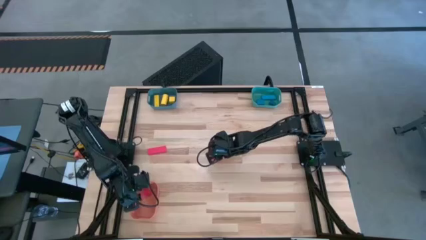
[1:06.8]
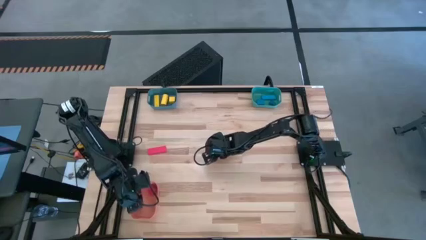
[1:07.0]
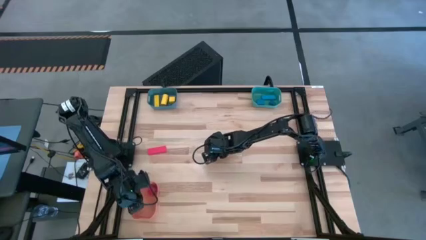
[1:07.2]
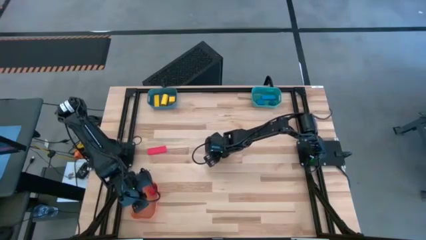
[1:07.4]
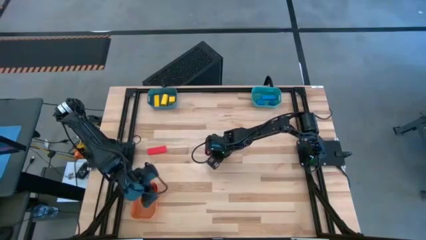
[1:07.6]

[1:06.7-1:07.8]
Task: Sort & place blocks by color
Put the right red block into the orange bin

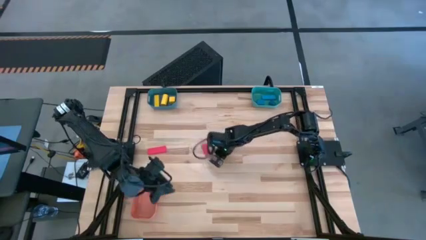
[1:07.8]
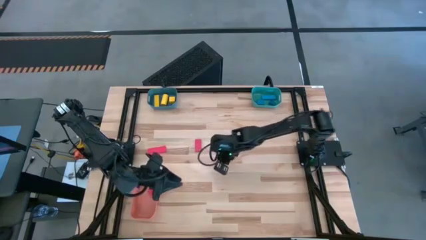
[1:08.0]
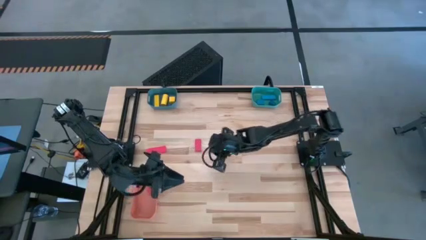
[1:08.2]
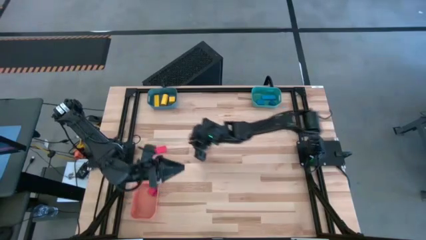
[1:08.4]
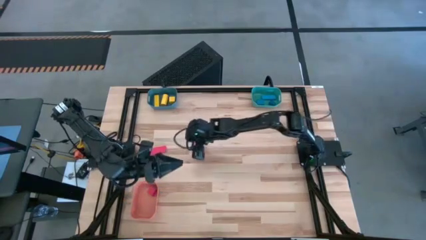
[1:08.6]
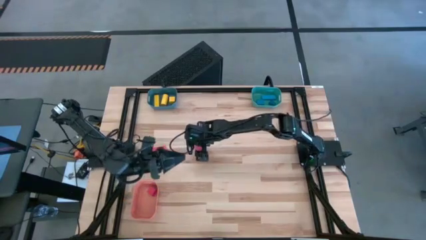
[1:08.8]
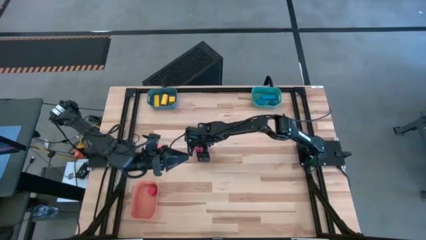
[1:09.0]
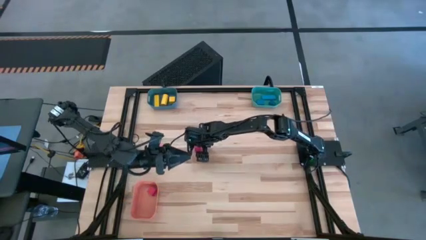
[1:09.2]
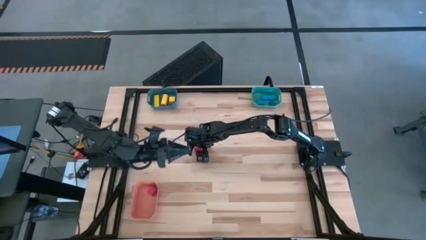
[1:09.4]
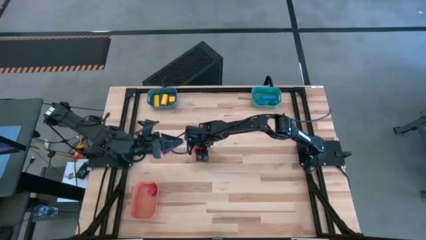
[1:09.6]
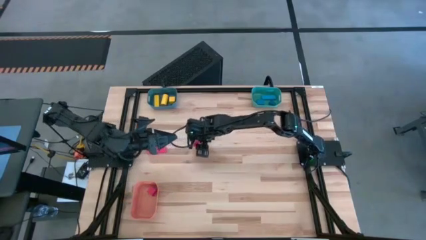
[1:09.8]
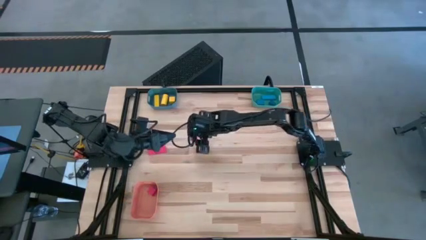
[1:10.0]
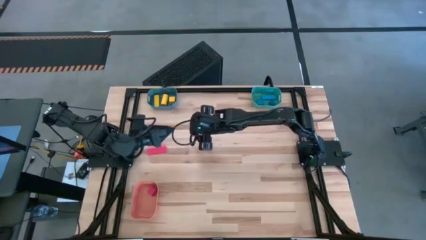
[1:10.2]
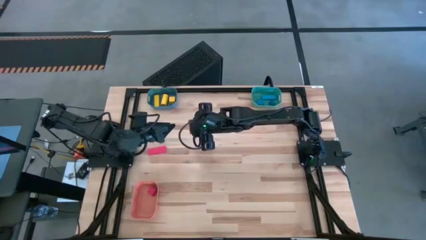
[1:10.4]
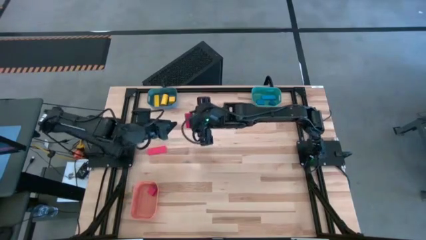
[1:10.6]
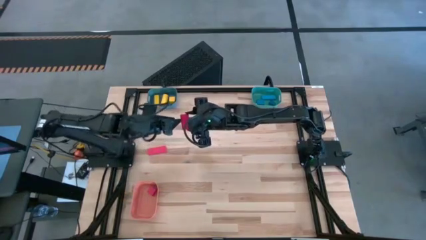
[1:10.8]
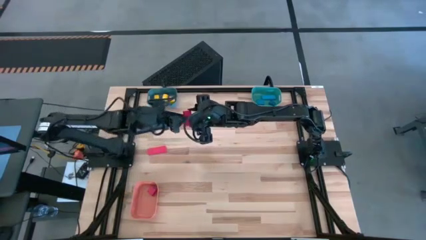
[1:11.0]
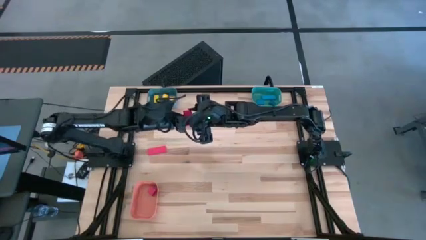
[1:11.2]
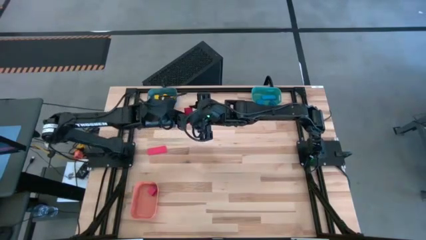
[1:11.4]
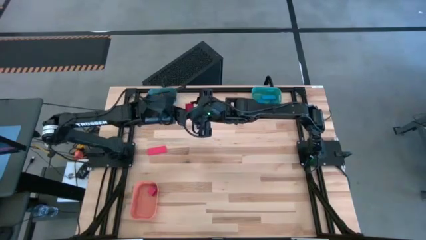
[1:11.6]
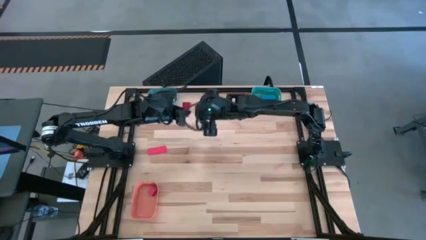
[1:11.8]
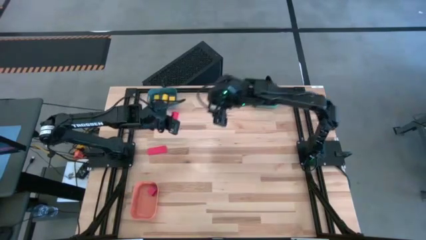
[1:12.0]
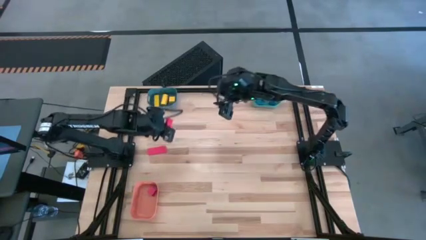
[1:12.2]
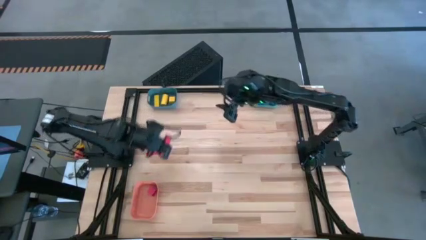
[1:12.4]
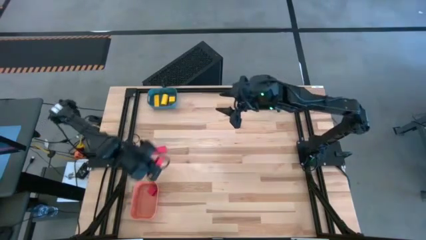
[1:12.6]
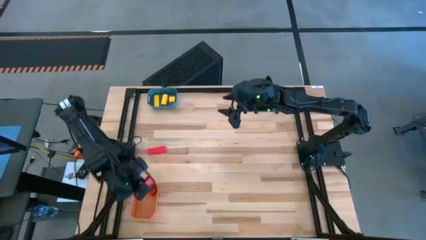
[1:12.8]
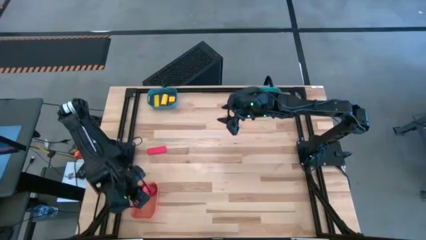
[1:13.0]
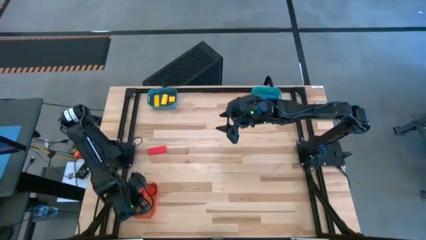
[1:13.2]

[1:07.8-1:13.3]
Put the right red block into the orange bin

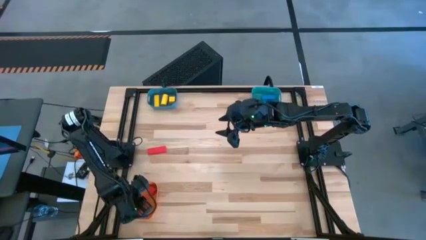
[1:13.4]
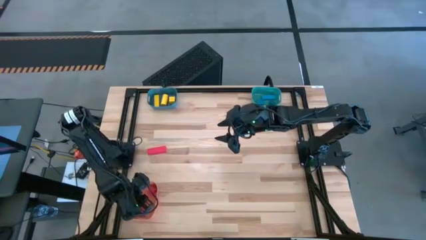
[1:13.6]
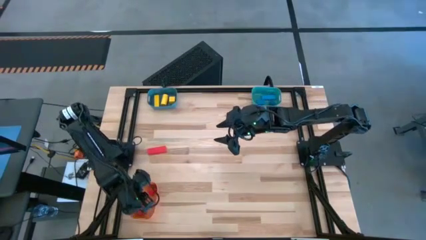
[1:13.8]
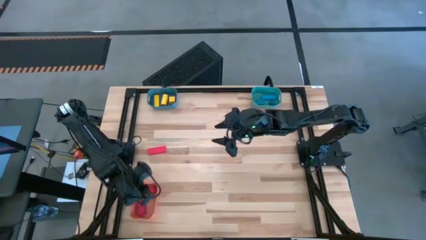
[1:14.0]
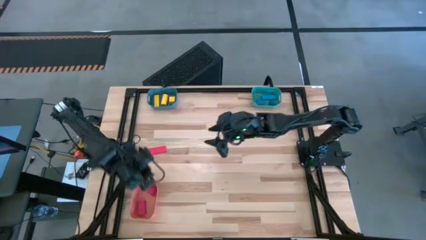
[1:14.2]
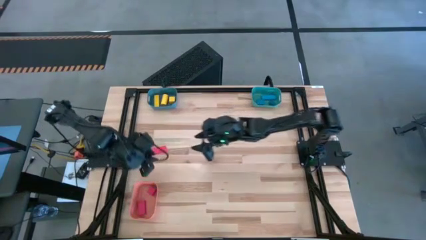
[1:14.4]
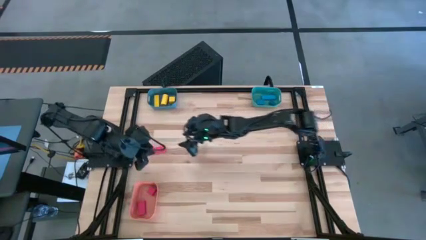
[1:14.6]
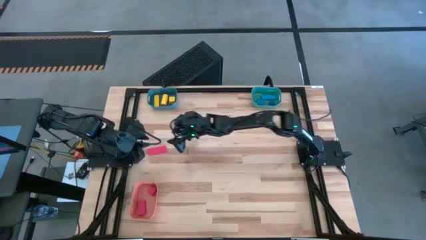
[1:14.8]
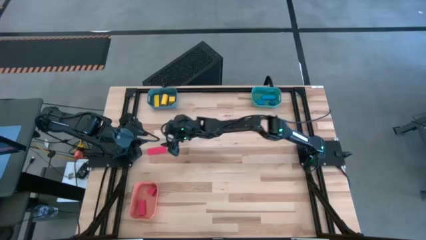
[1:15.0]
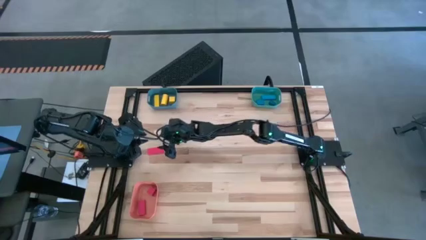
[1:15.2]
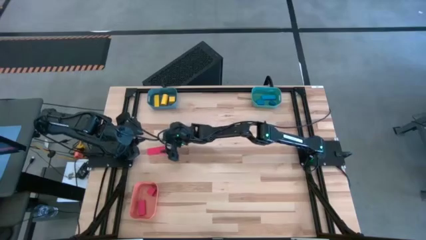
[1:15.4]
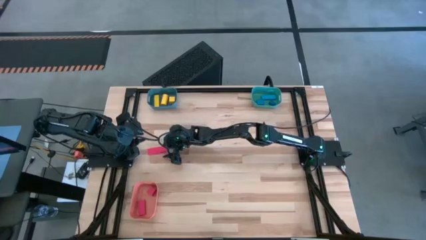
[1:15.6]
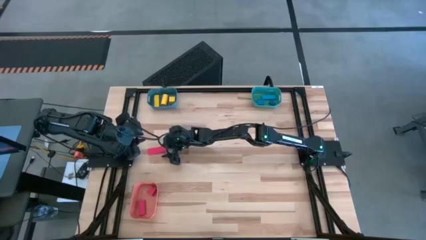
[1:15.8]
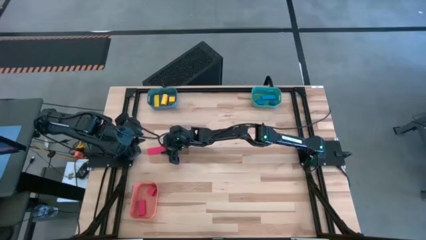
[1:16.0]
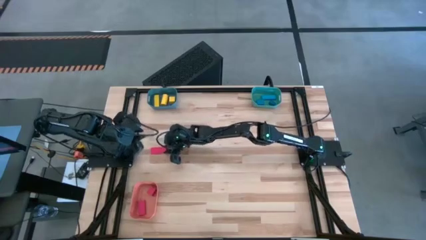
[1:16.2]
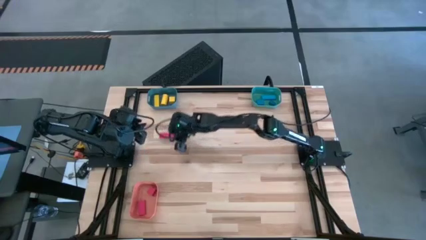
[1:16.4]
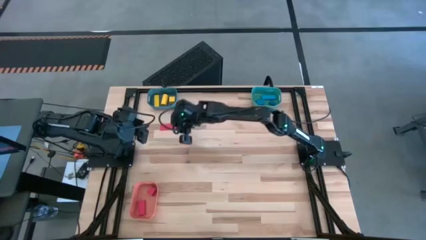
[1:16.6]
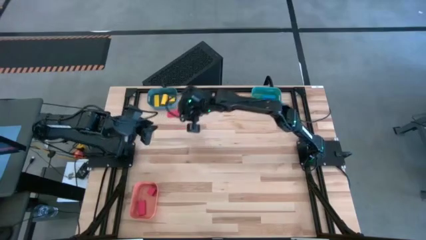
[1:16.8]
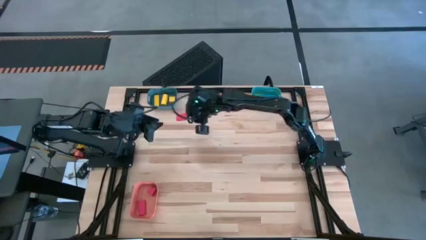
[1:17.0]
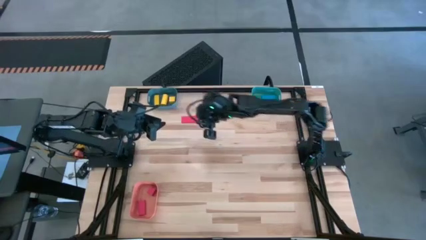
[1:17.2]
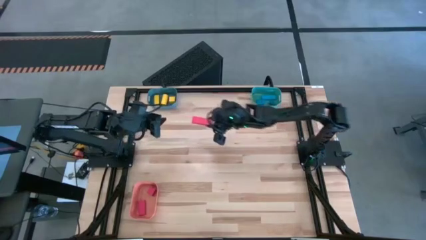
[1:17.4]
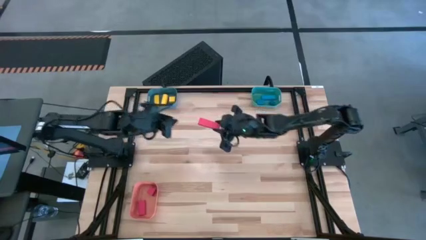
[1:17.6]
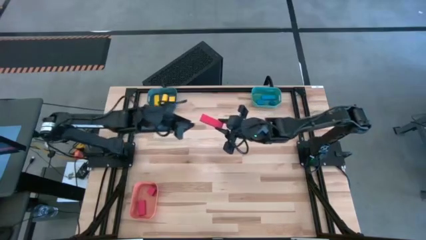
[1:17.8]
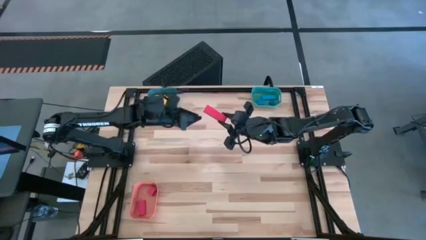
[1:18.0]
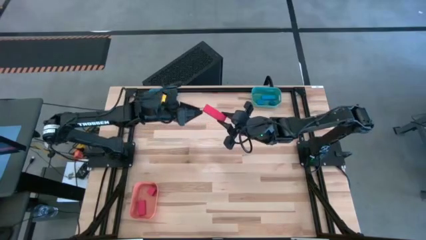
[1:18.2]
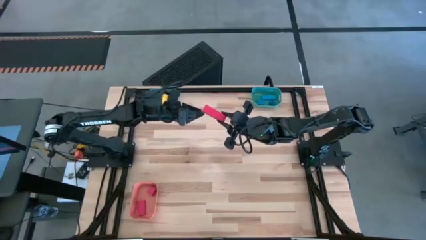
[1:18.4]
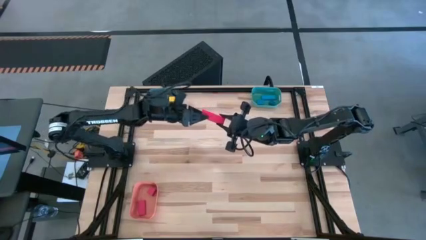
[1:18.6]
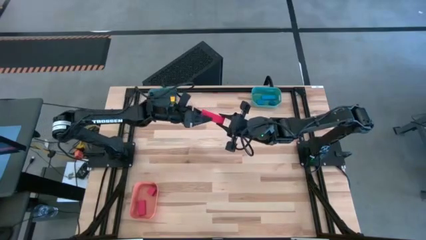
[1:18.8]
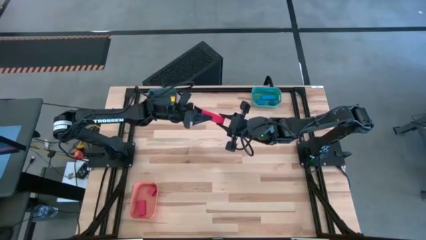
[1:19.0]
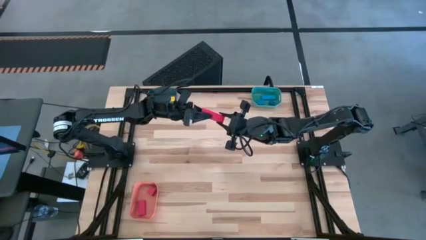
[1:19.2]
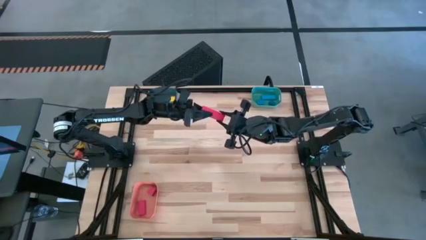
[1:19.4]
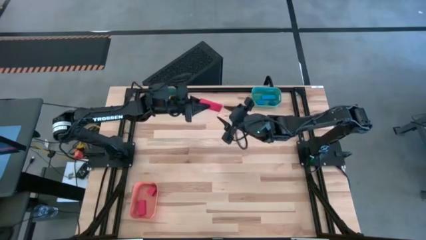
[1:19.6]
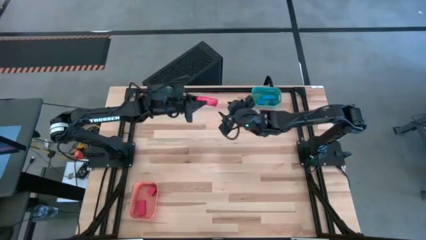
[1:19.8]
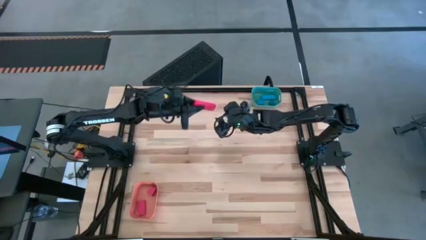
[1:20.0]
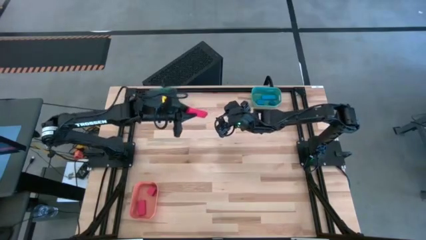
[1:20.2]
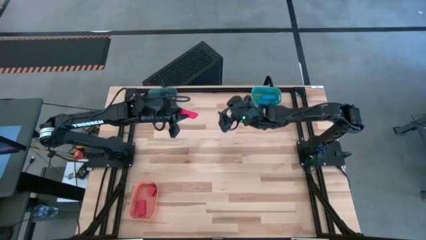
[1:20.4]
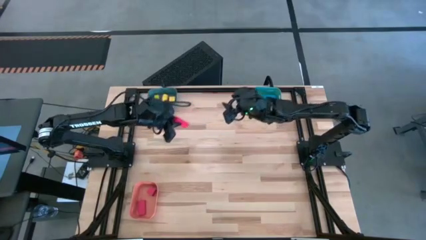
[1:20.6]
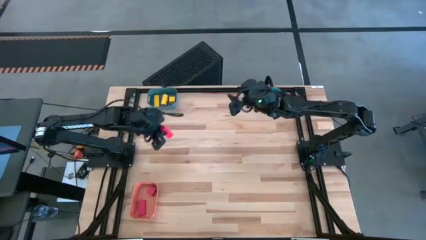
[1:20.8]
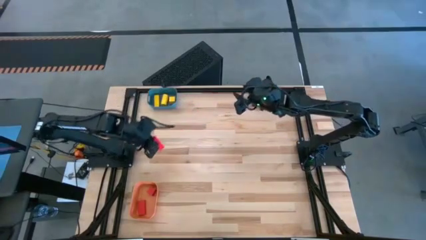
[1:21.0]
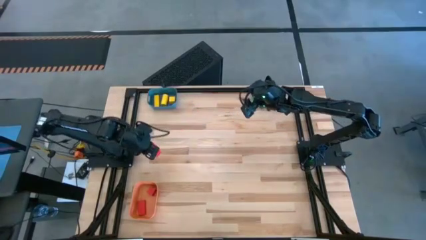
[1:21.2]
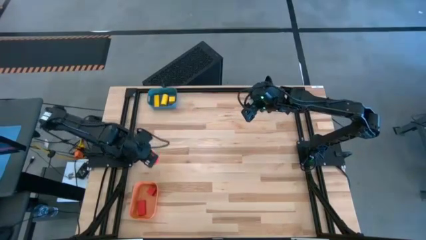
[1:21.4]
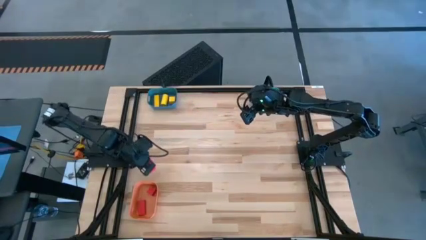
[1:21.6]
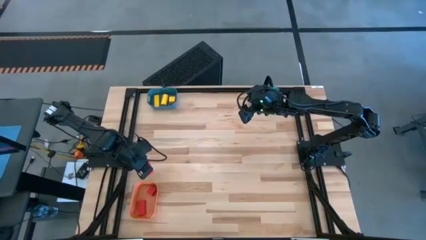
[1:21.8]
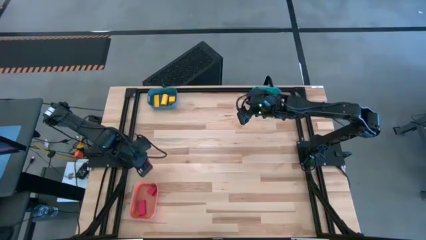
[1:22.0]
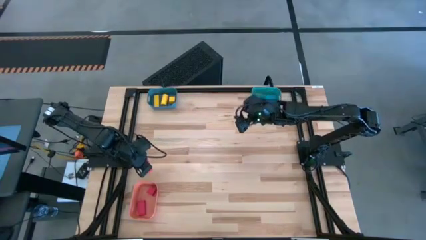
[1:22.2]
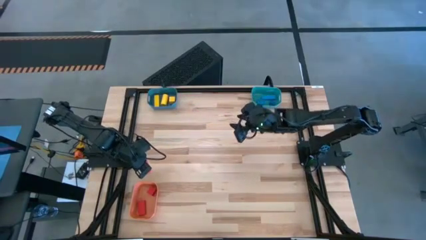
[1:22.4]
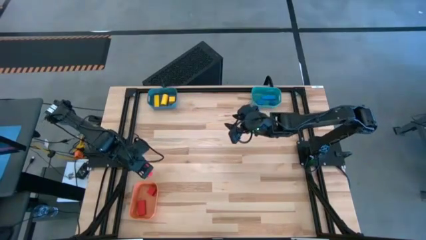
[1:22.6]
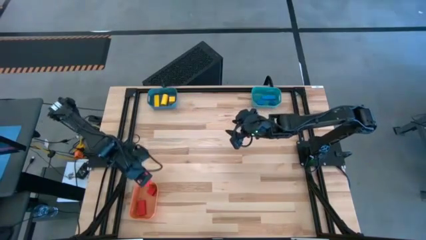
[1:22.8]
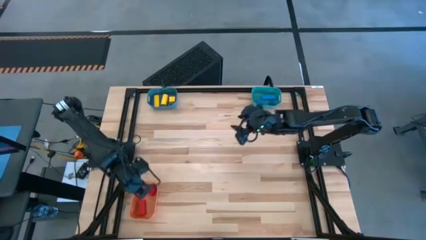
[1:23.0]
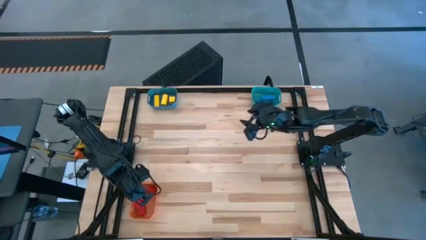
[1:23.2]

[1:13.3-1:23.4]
Put the red block into the orange bin
